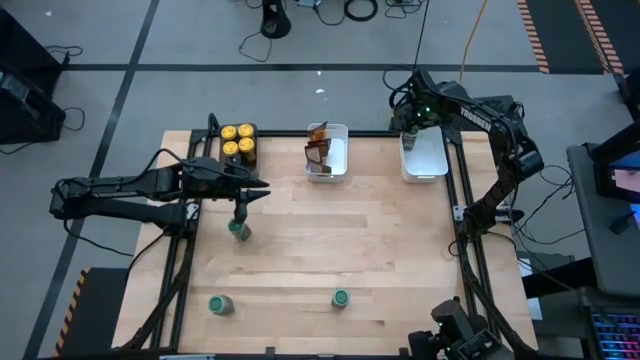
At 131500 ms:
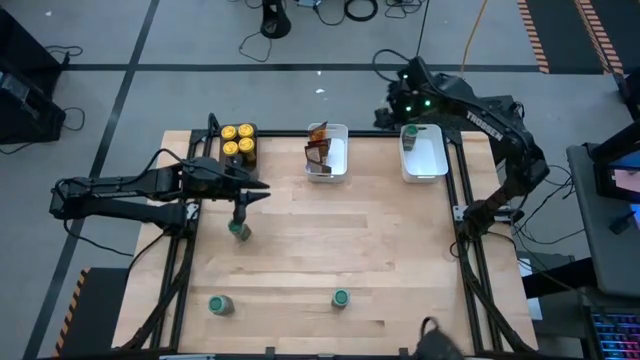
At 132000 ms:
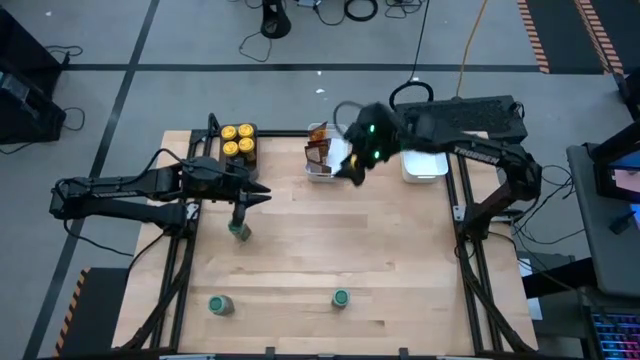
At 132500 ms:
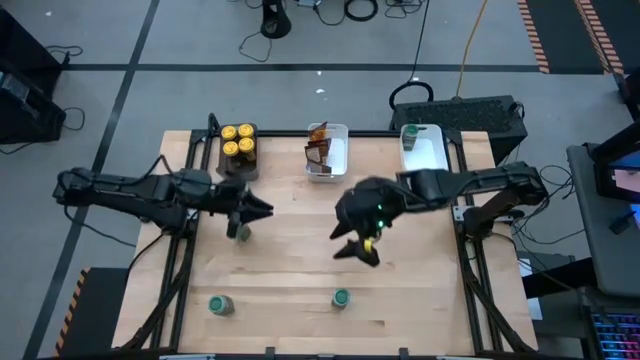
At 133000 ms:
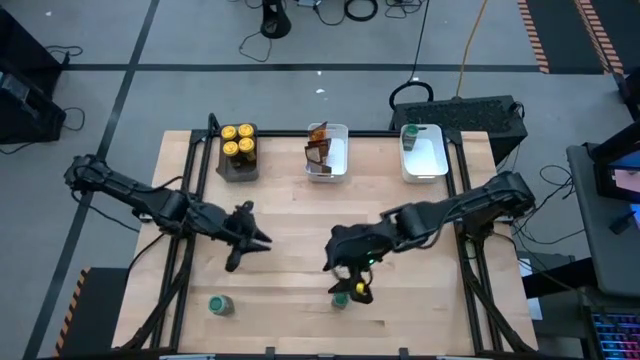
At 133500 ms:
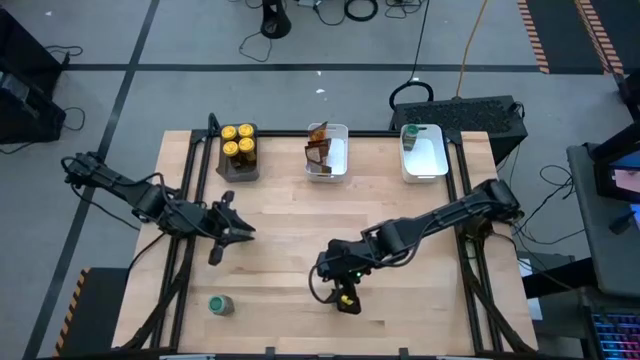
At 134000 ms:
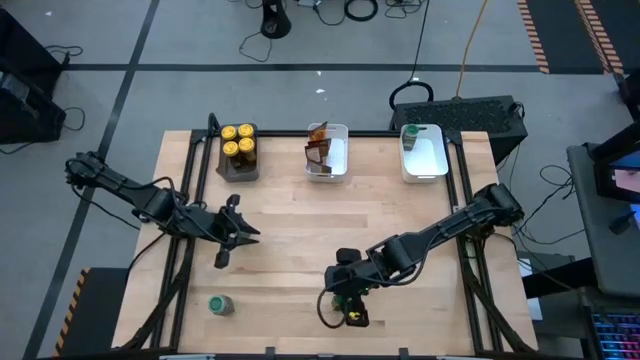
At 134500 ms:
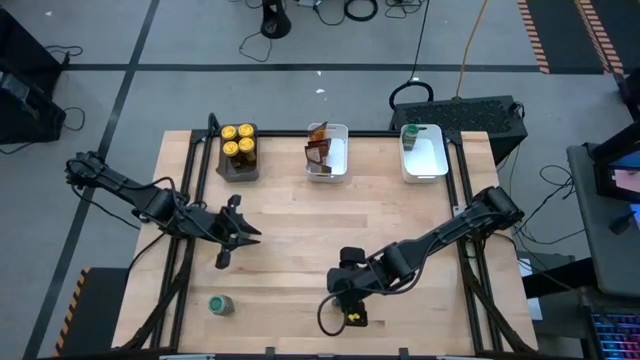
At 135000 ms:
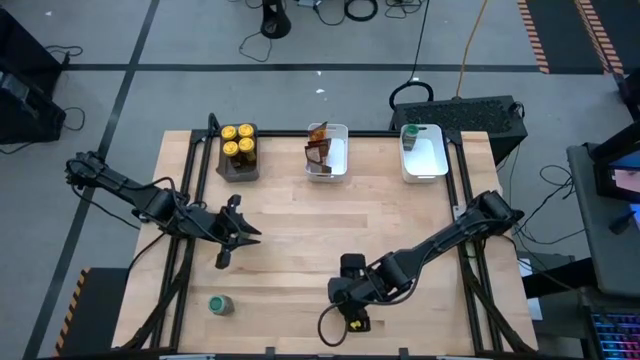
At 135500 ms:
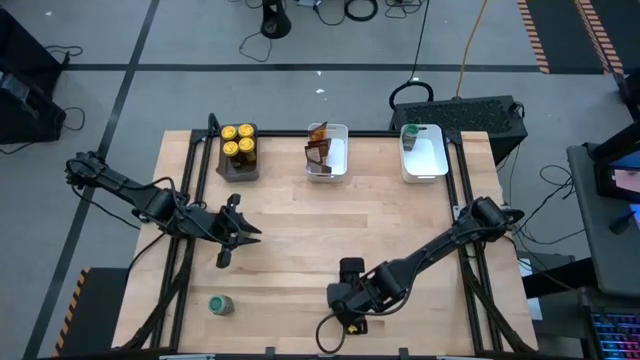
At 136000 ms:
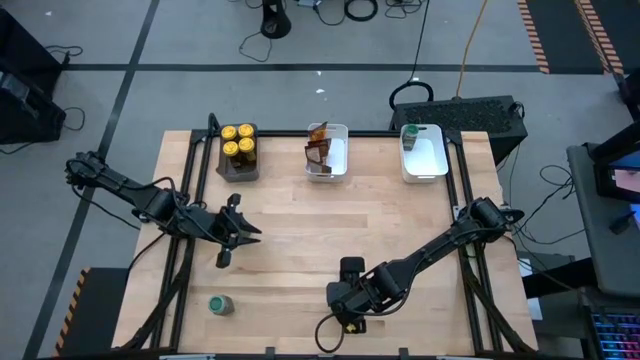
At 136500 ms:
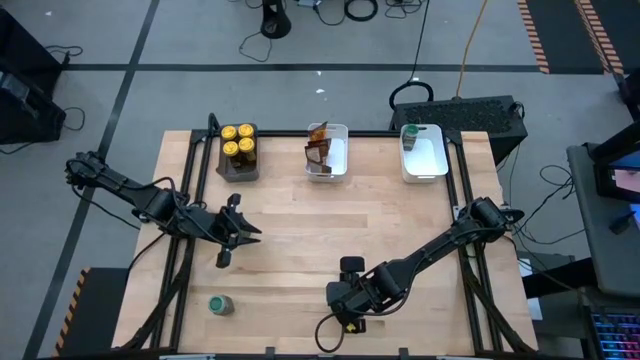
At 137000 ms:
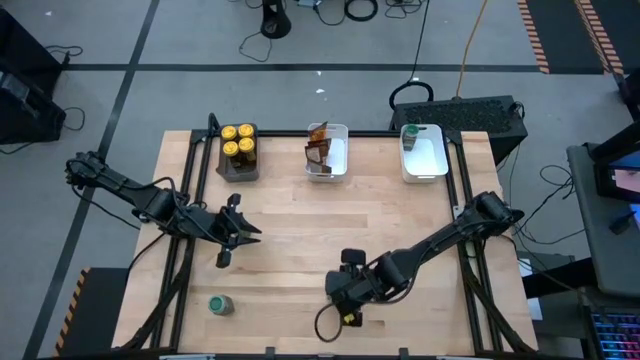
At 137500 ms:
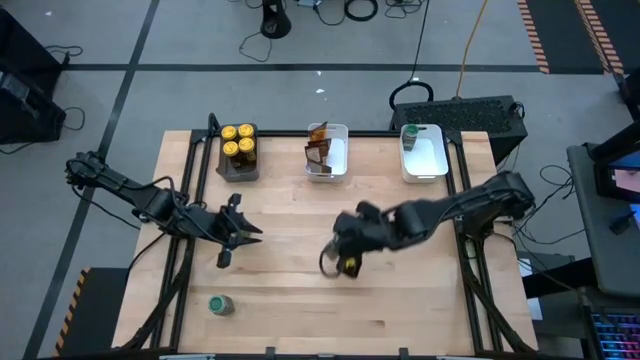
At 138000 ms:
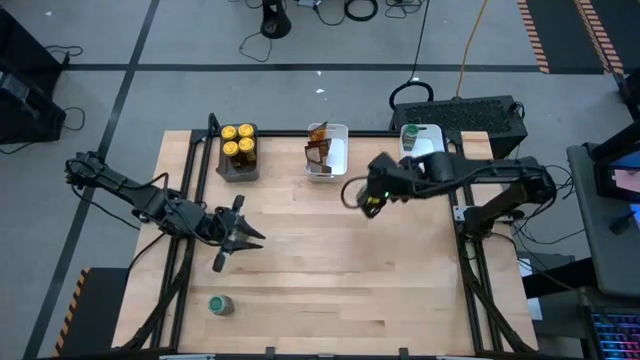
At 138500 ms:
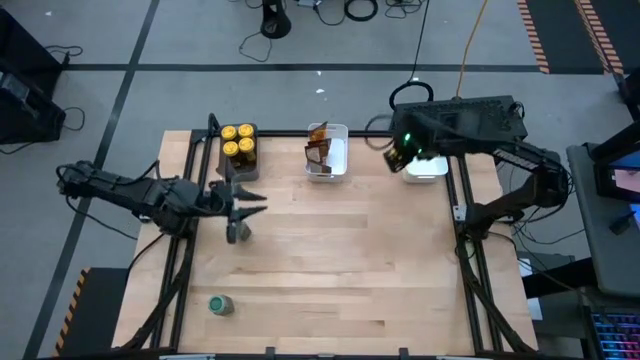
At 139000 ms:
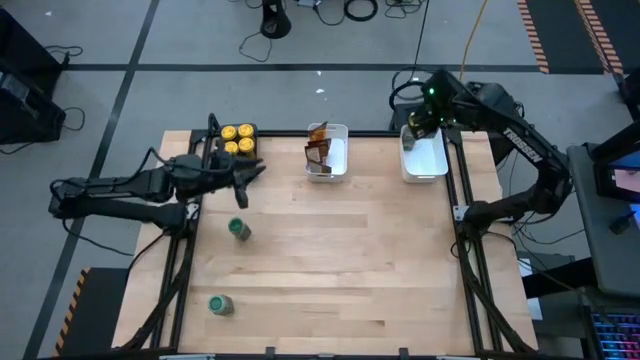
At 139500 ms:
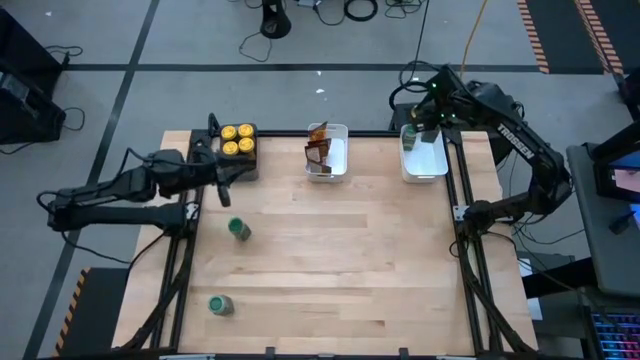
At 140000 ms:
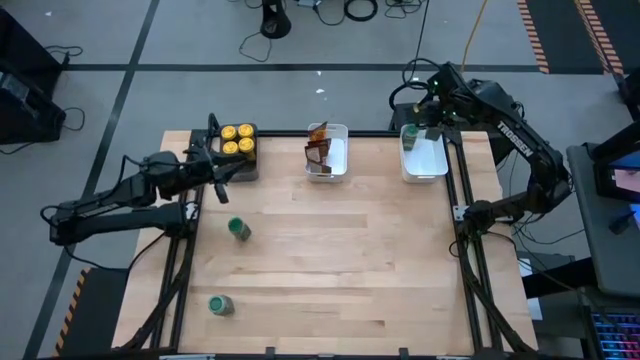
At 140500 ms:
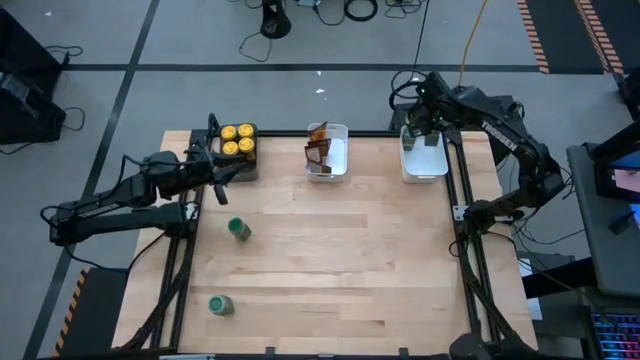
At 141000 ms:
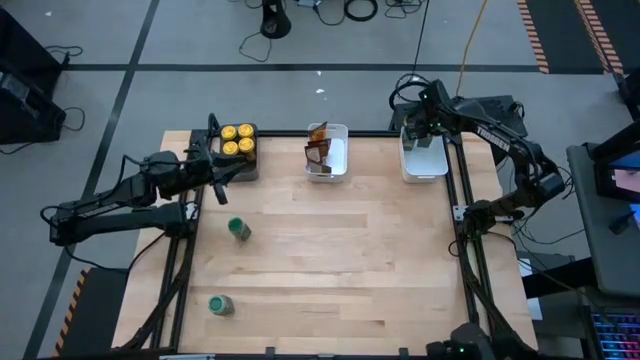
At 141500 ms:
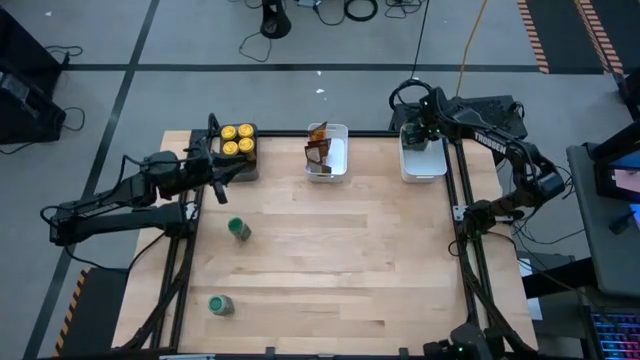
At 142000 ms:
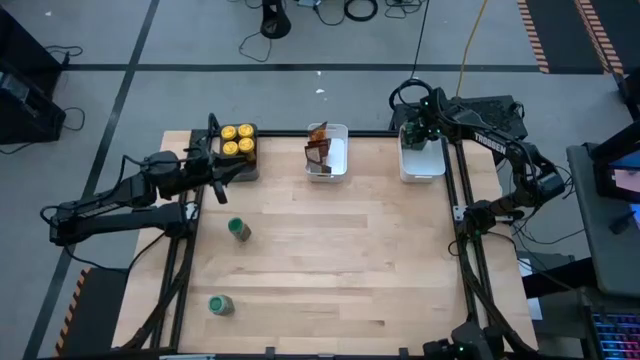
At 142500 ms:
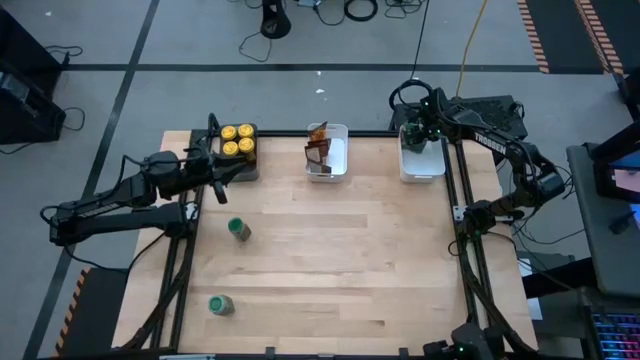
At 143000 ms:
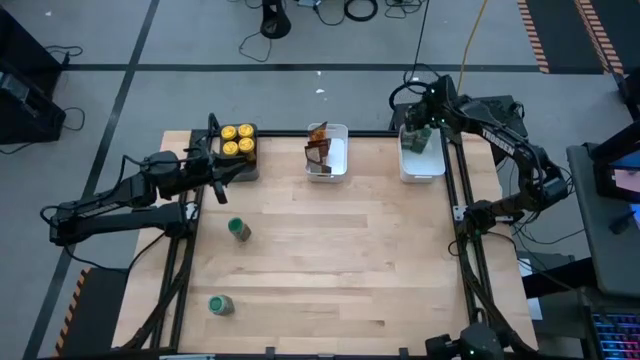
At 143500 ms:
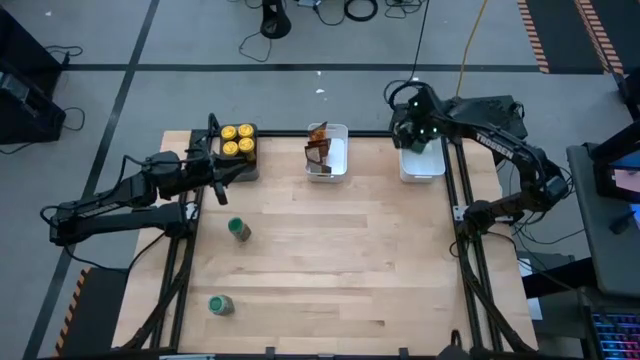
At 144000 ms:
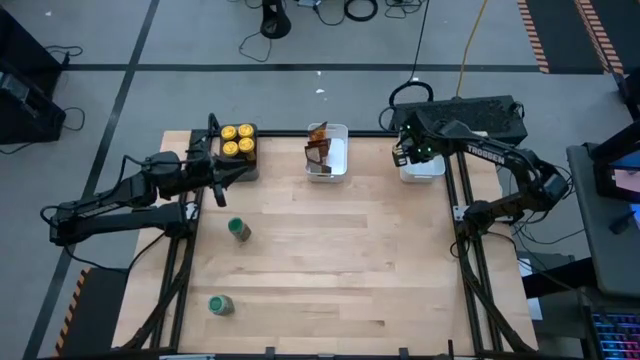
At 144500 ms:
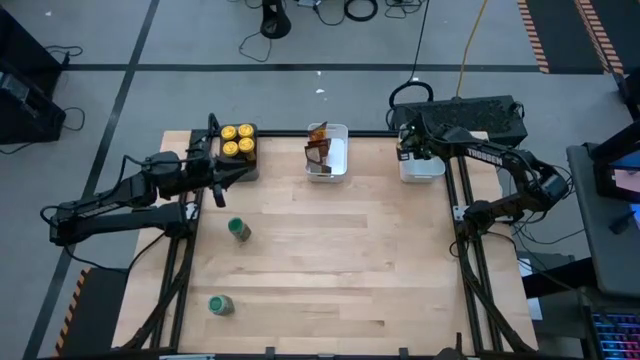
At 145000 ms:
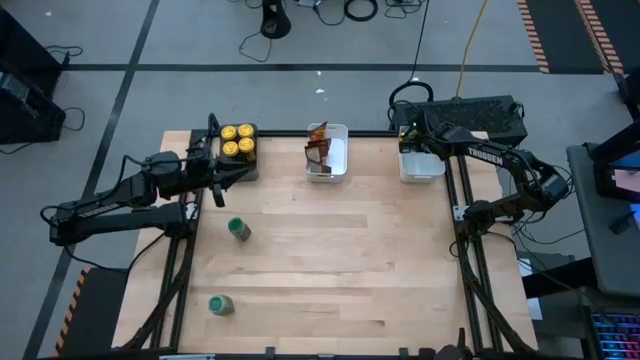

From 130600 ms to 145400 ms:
Task: Sort spices by type
Put the bottom right green seasoning bottle into the right white bin

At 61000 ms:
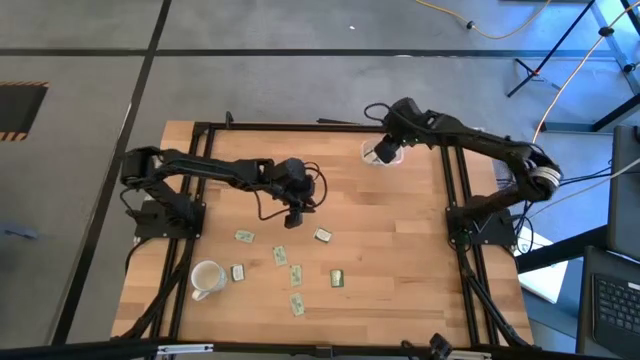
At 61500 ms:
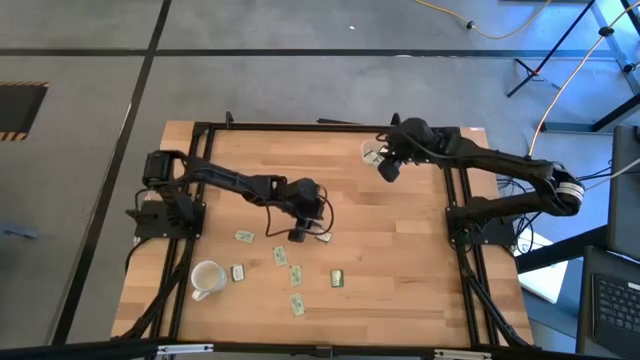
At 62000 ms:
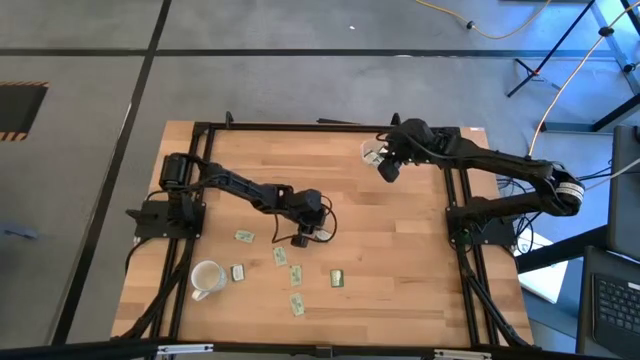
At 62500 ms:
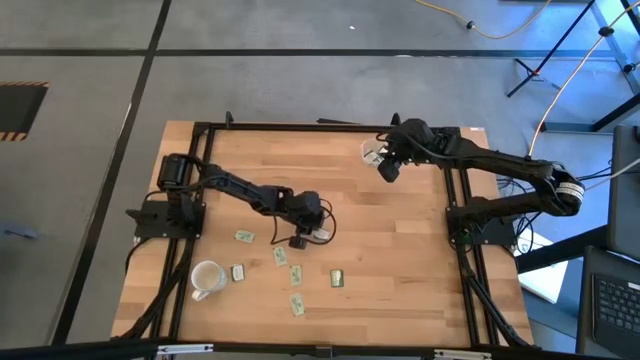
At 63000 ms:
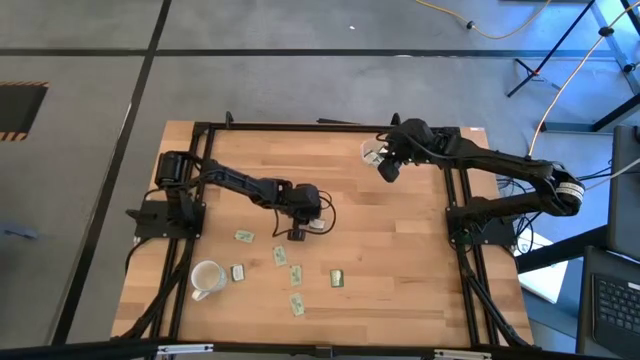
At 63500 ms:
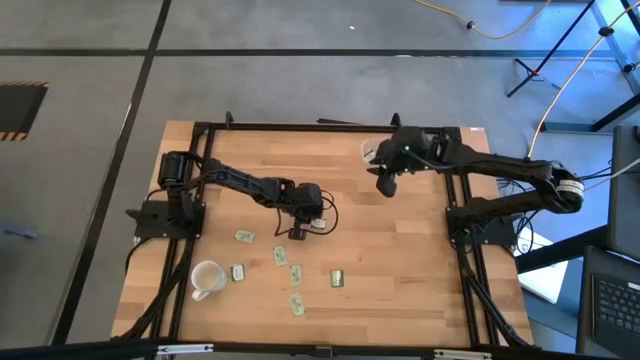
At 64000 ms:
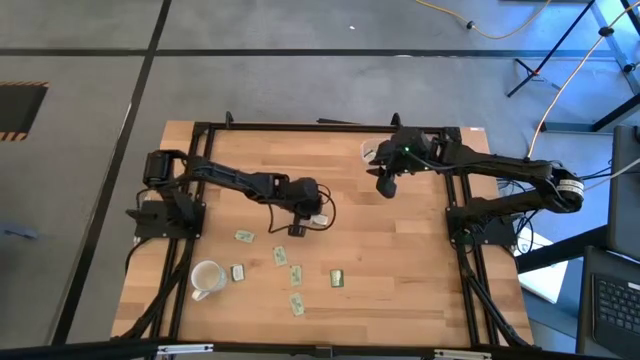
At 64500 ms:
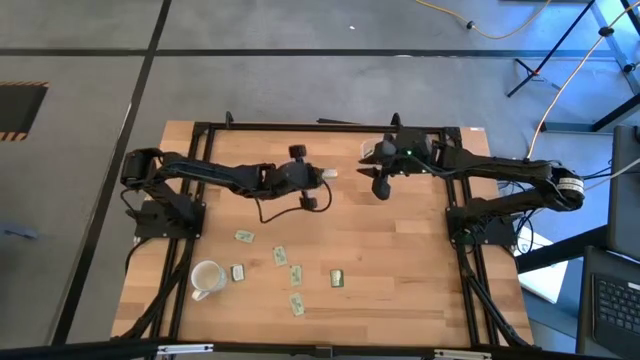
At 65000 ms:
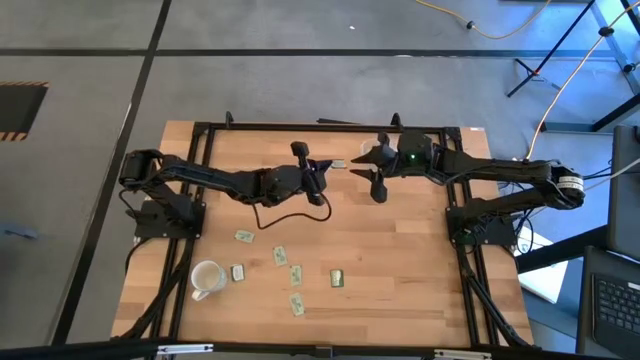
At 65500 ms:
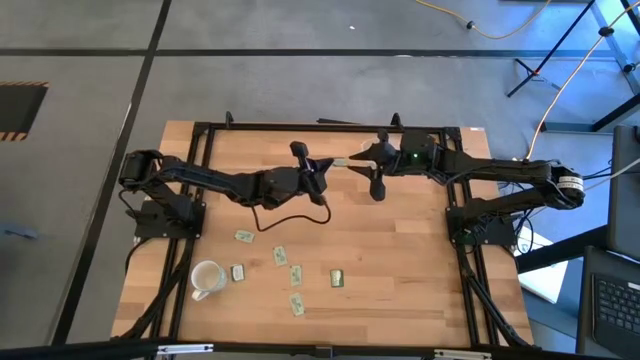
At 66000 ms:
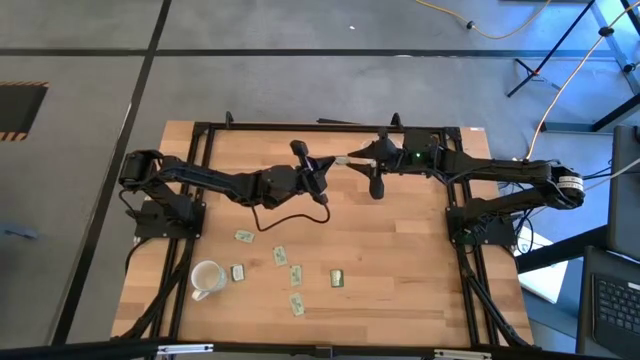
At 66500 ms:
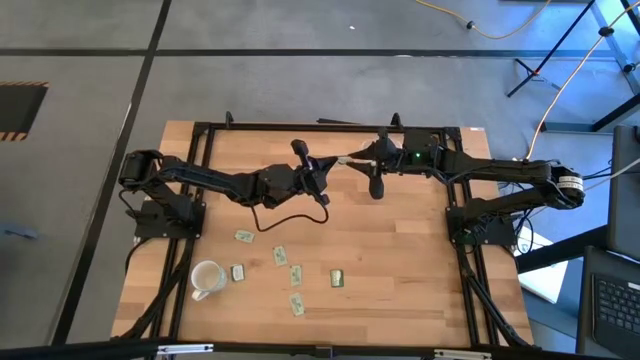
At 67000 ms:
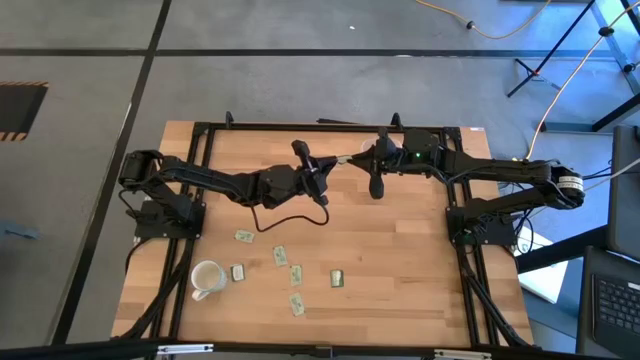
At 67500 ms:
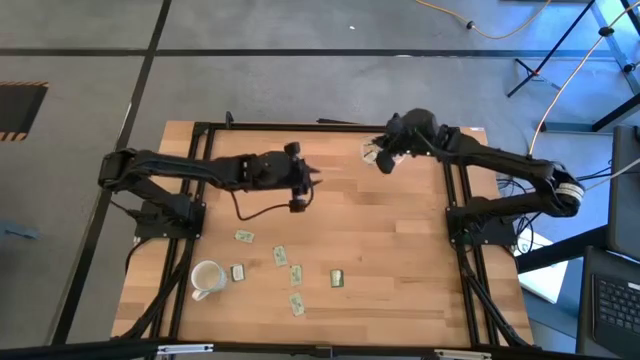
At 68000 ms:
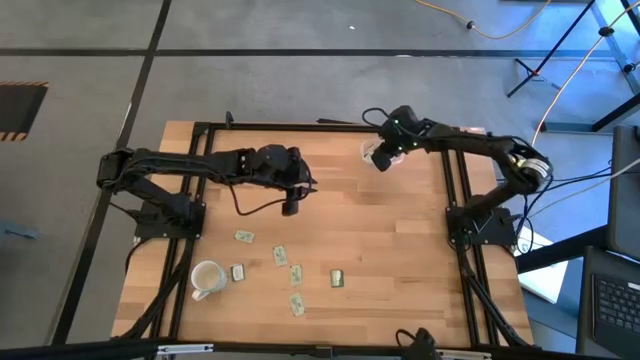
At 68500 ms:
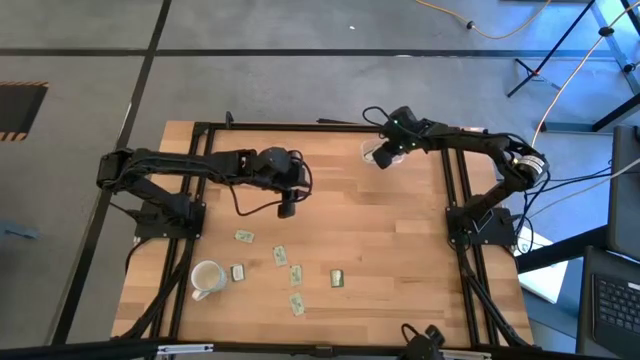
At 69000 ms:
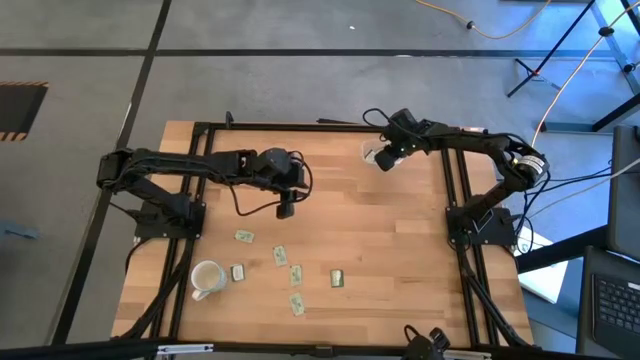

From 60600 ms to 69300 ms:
Task: Pick and place Stevia / Truvia into bins
Put the dark green truvia packet into the transparent container
